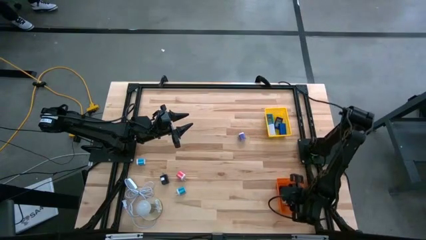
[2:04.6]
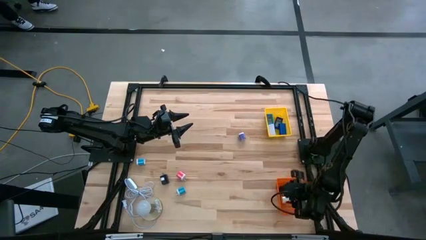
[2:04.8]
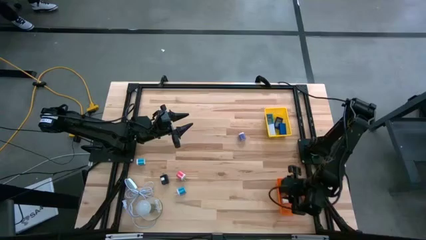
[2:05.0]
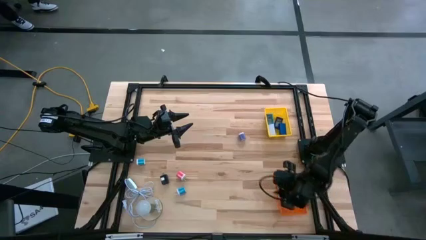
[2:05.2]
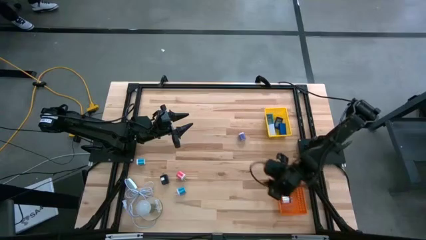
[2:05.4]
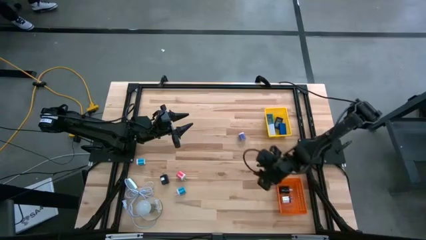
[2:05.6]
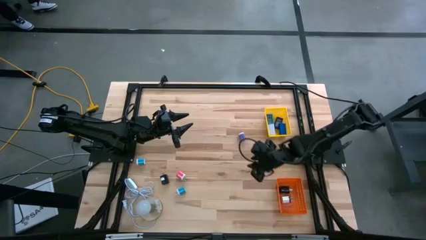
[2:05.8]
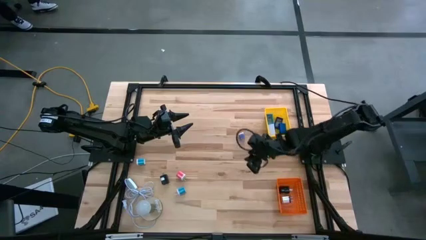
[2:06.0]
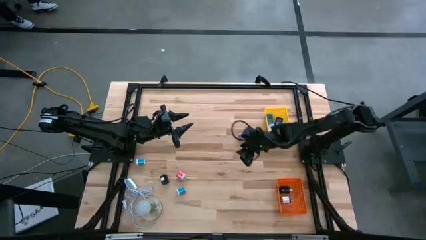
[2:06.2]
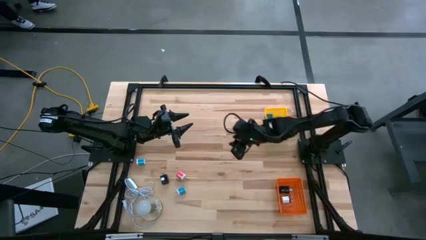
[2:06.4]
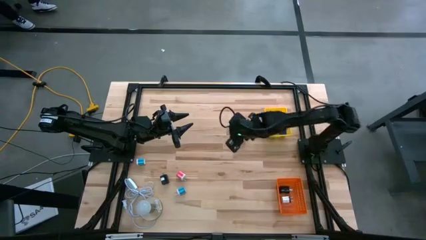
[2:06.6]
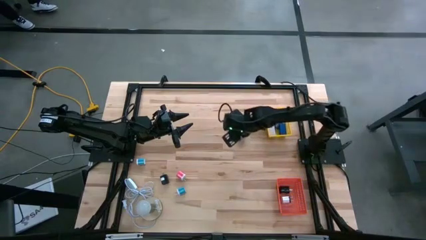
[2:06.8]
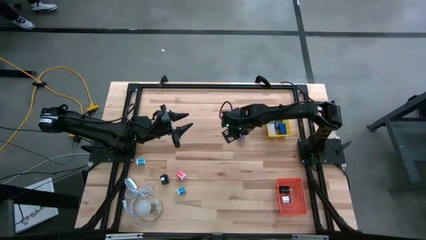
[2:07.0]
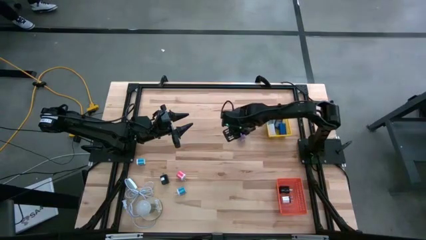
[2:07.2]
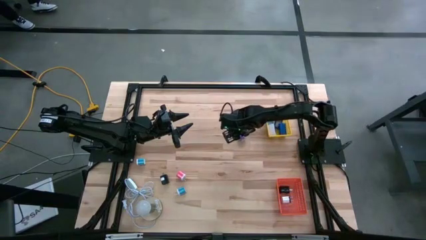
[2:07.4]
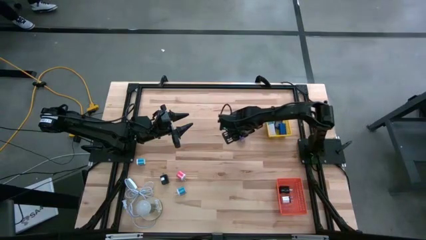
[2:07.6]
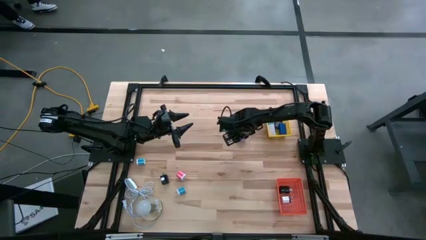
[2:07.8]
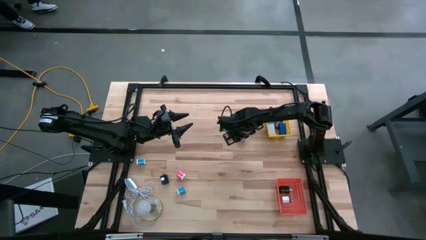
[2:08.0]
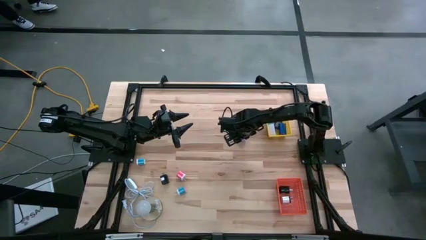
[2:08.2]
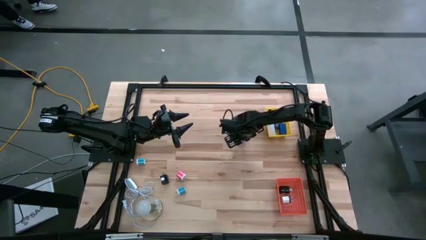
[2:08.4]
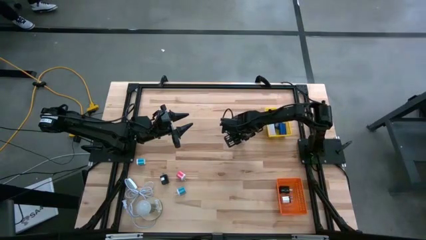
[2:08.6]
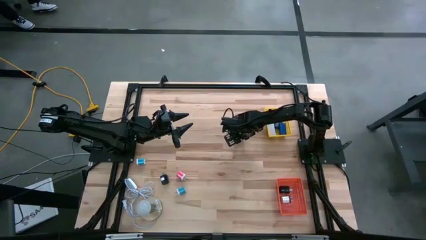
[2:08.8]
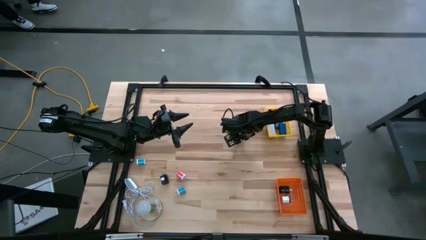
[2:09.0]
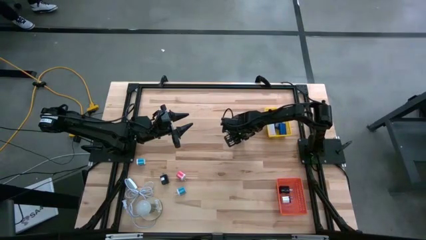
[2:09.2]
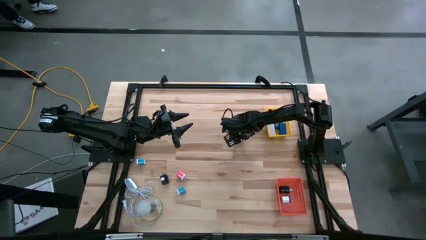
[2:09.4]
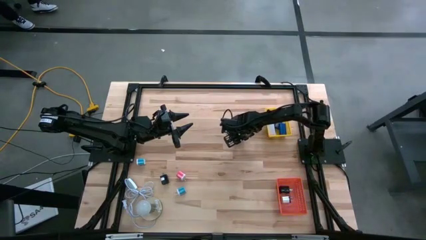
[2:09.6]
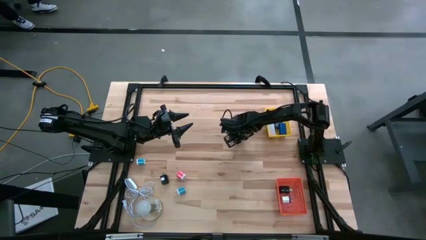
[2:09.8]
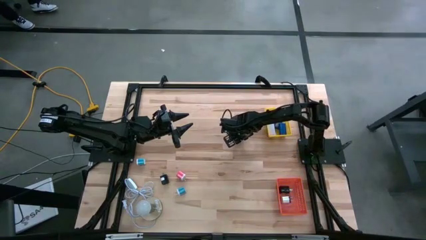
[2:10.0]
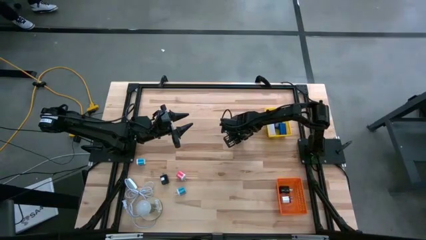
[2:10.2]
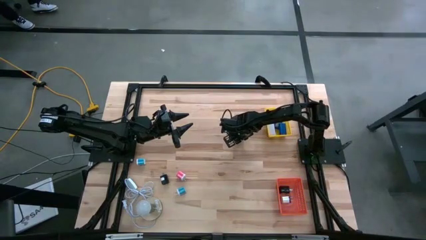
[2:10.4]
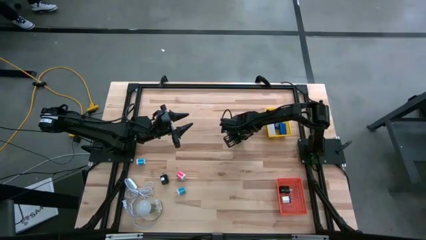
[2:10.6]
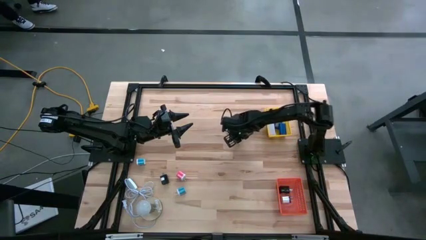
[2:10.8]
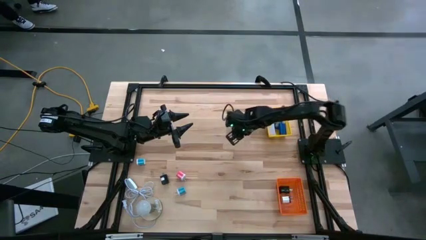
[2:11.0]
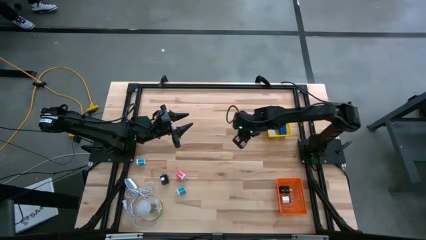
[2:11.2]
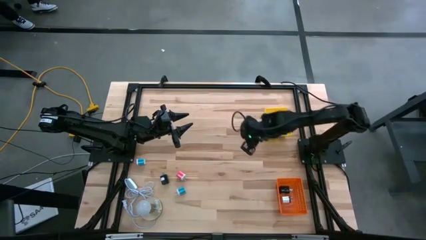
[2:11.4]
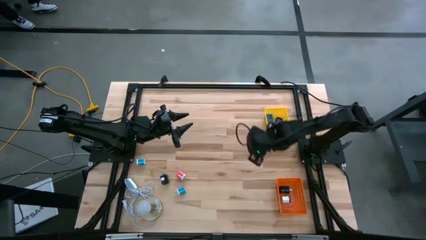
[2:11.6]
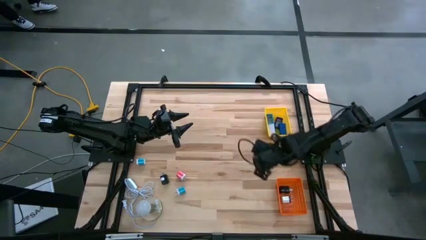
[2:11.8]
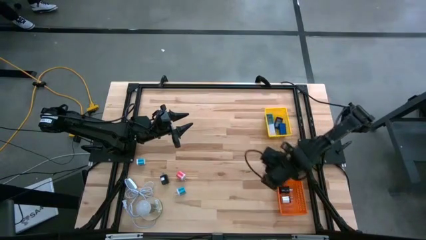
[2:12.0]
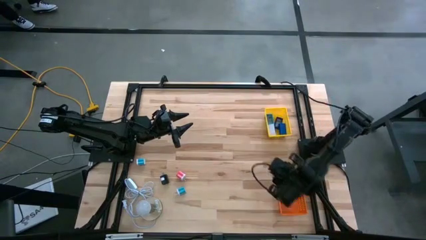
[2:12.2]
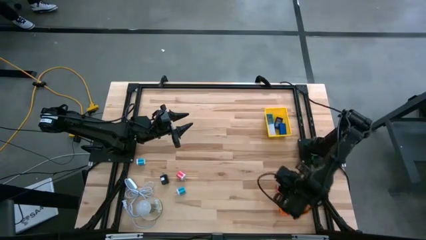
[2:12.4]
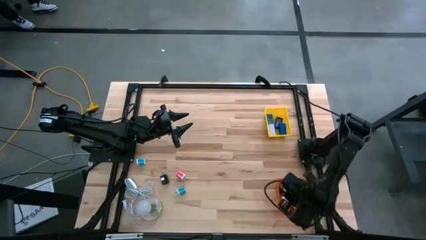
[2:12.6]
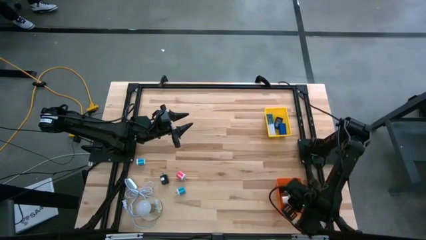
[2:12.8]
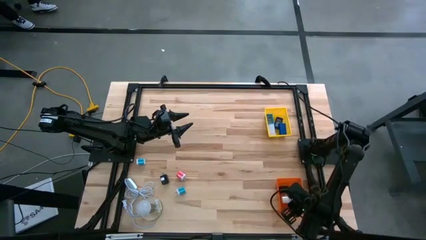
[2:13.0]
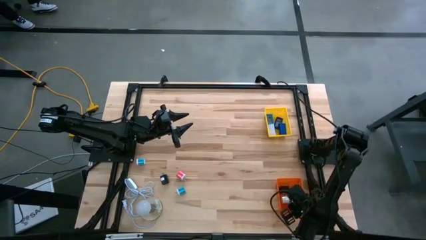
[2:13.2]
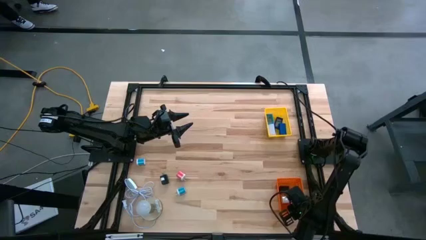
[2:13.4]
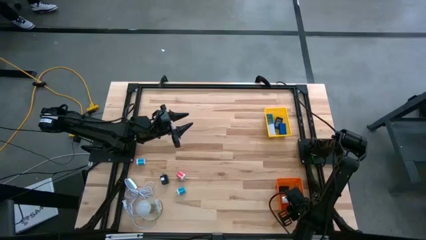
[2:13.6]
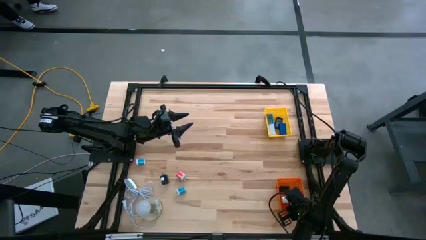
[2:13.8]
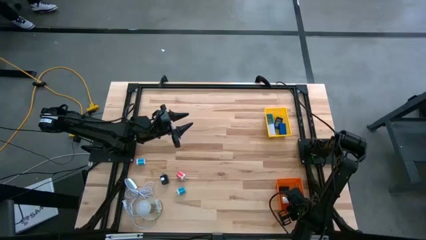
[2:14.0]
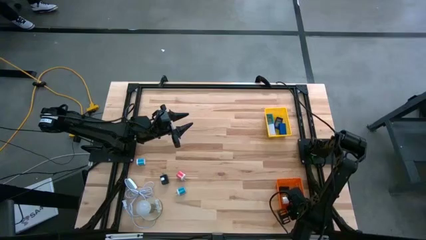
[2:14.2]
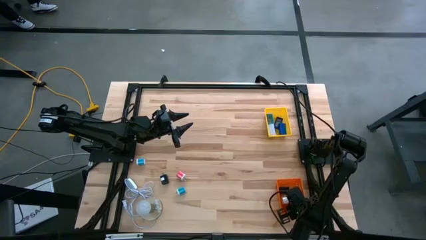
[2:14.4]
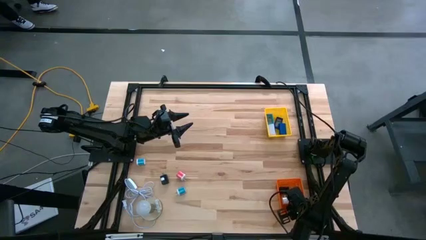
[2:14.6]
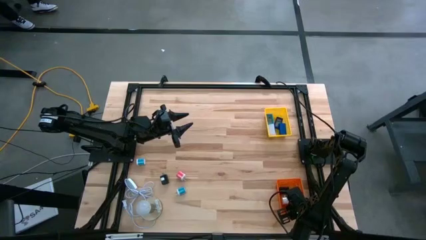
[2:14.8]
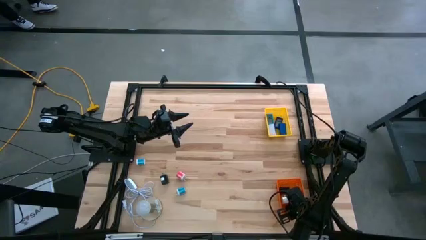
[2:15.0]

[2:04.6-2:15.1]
Task: Pick & Place Office items
Put the purple charger adapter into the orange bin

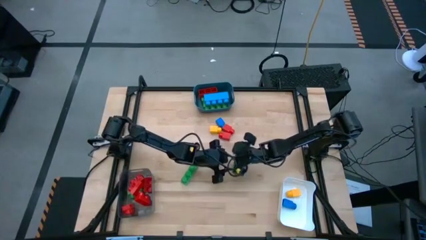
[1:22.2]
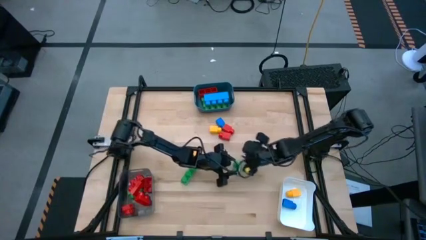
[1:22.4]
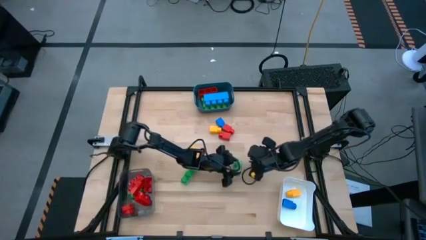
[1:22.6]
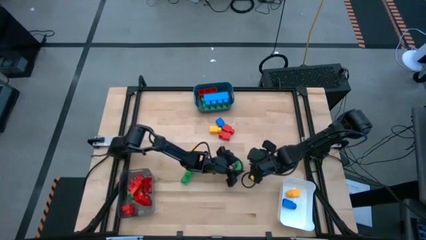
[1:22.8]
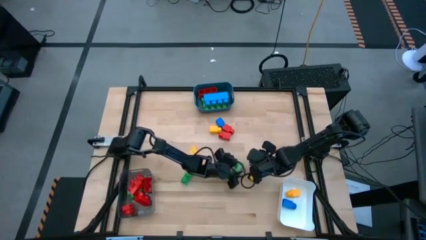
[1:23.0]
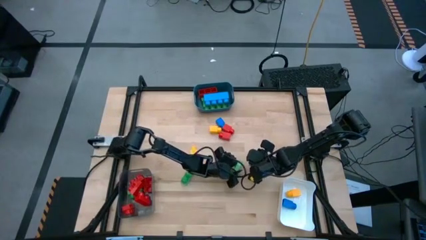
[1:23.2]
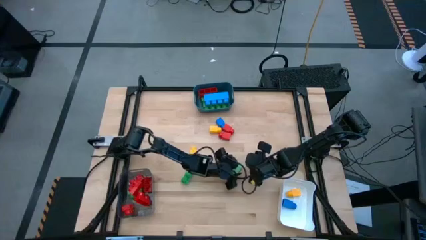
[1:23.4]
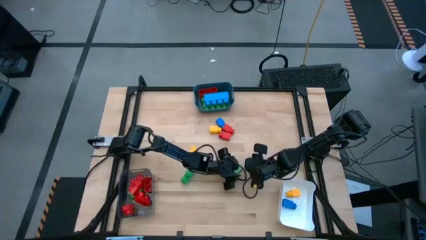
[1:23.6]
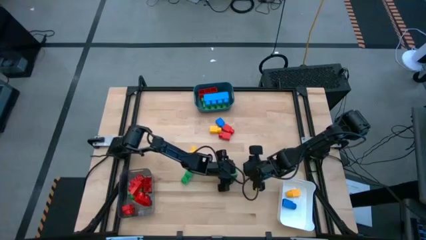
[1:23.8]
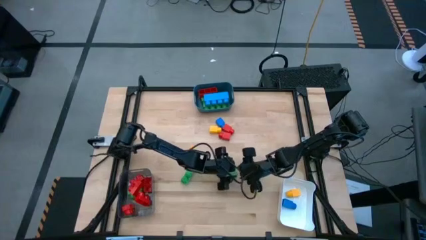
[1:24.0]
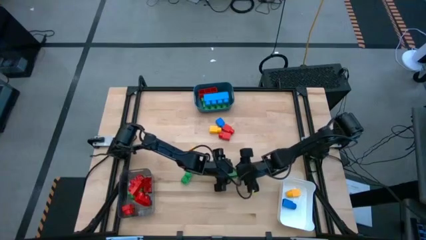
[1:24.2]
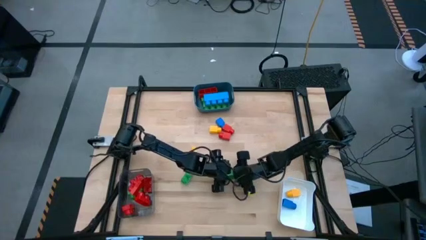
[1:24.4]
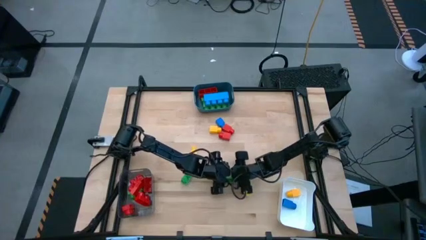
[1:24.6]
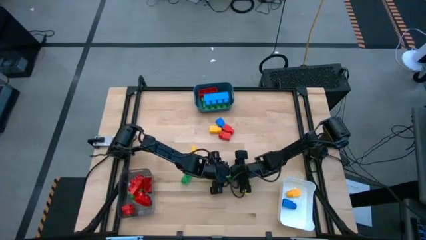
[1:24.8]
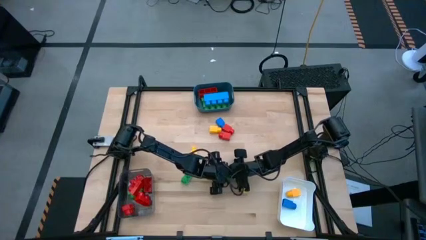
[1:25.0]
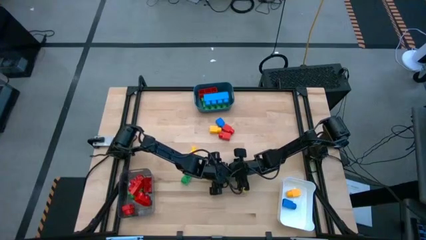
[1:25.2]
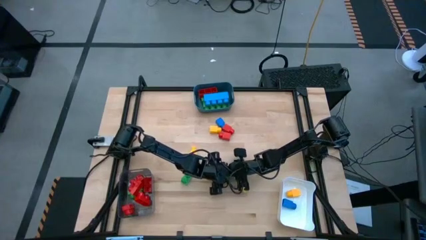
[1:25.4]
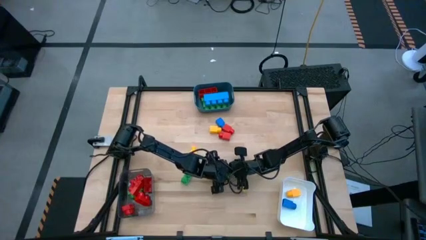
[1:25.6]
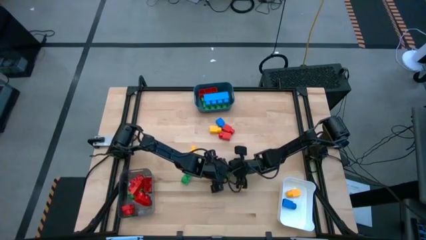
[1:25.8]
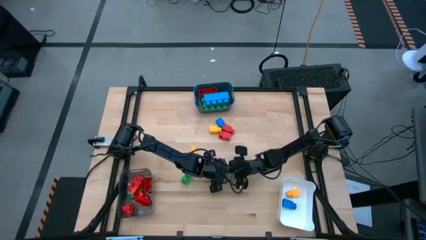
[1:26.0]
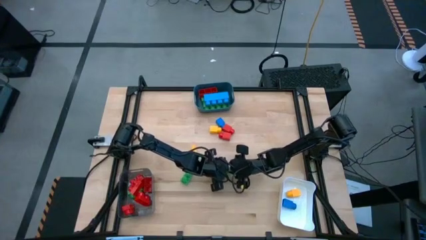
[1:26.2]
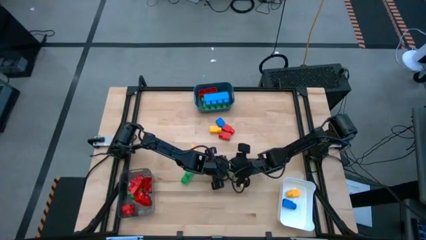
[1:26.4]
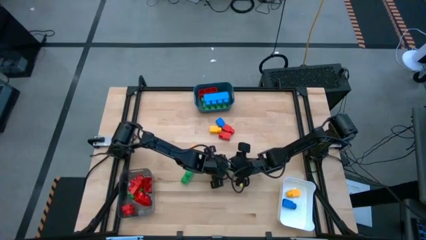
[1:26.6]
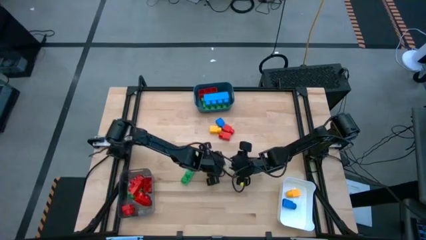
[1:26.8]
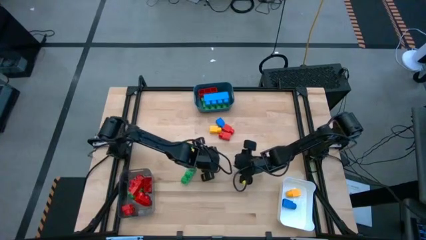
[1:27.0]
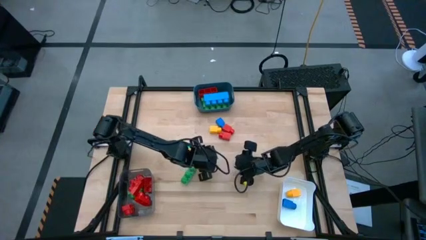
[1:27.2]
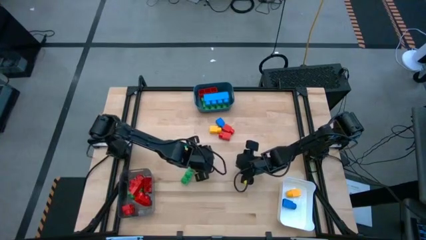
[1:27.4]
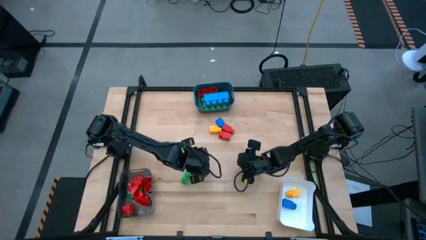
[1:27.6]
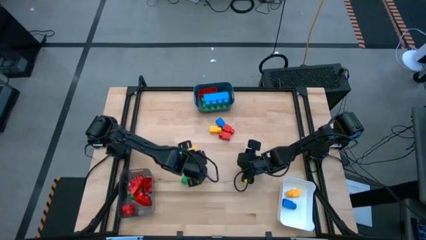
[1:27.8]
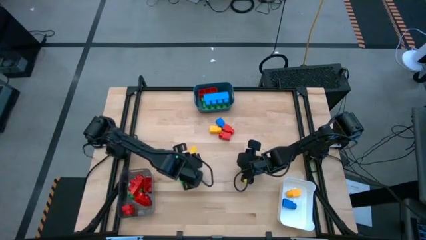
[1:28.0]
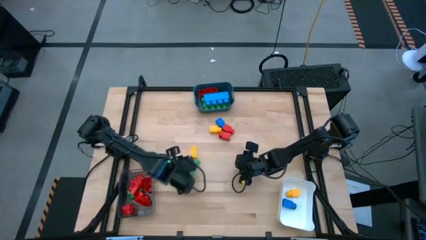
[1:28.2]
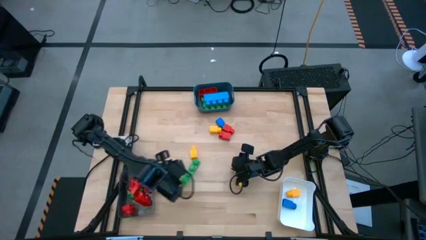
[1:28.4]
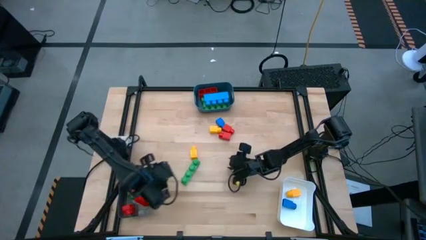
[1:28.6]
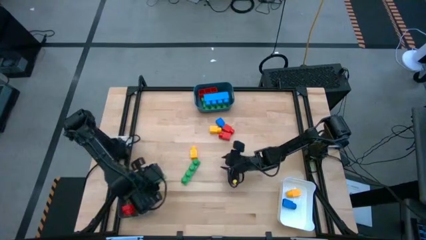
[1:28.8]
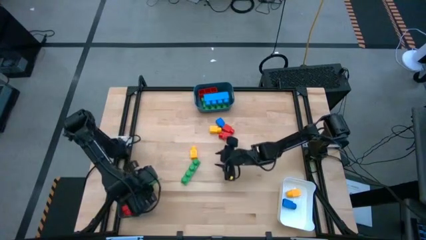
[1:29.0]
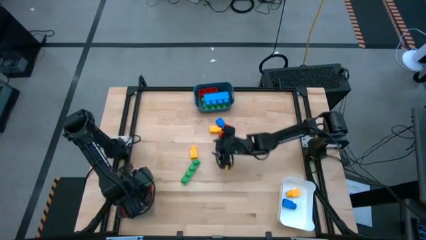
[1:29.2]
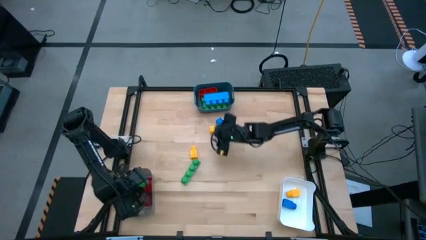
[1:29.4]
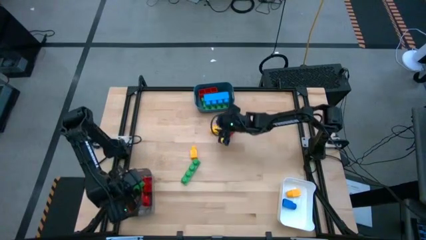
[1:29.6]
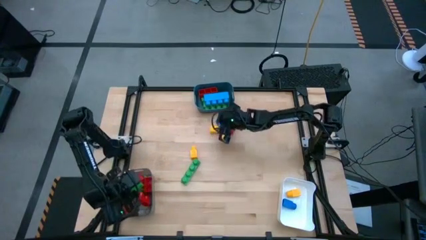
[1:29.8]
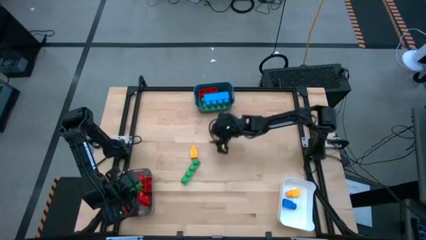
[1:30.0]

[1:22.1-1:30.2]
Task: Sort blocks by size
Put the green game piece into the grey container
